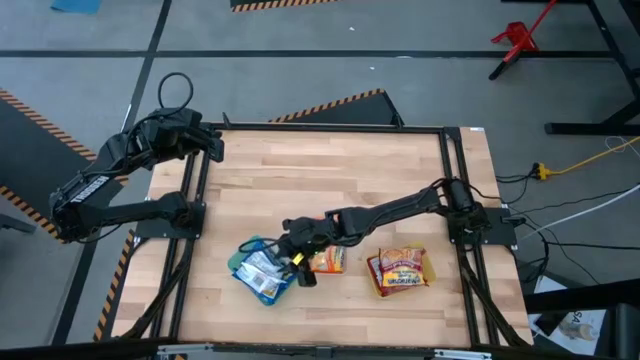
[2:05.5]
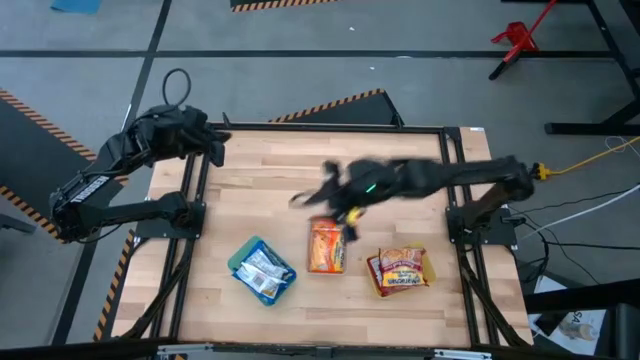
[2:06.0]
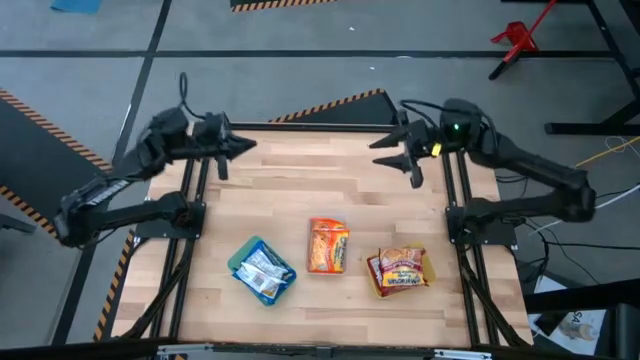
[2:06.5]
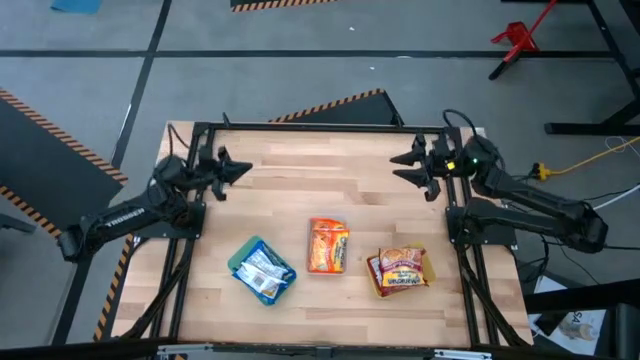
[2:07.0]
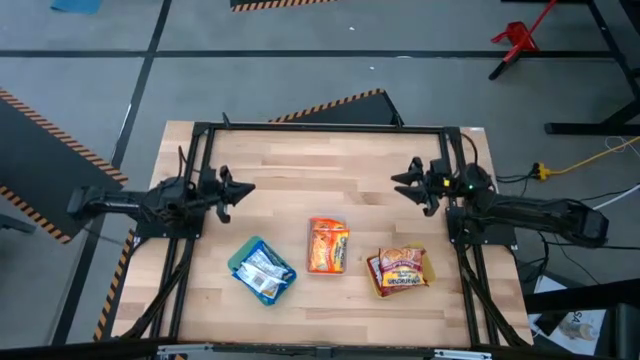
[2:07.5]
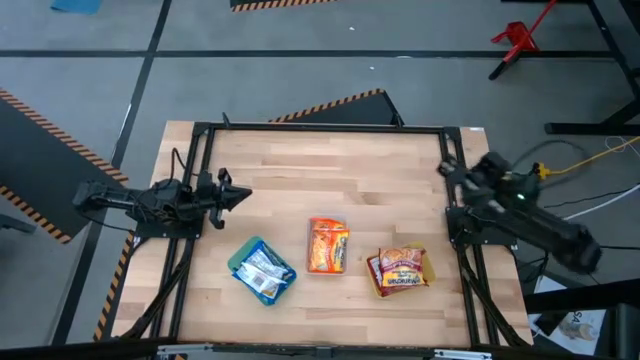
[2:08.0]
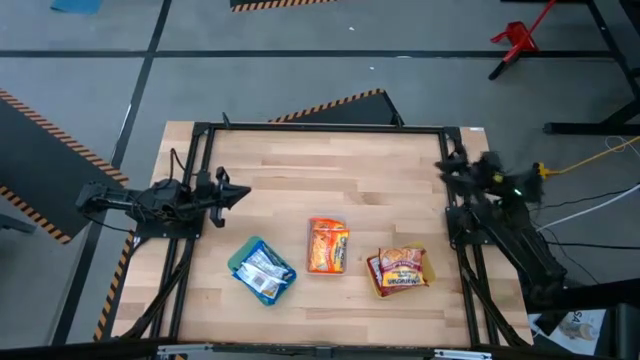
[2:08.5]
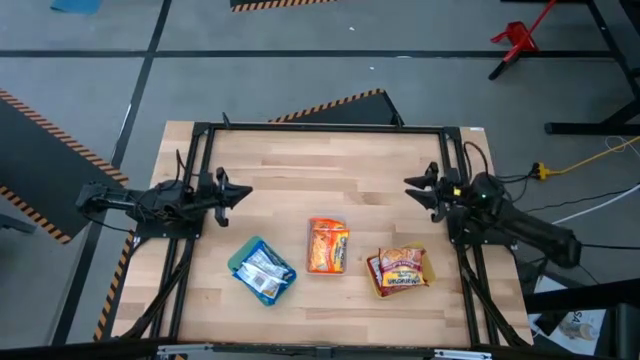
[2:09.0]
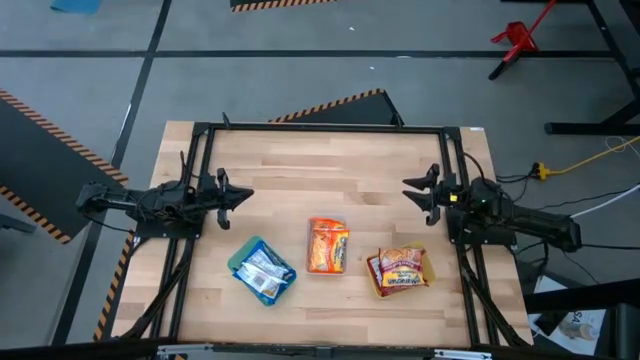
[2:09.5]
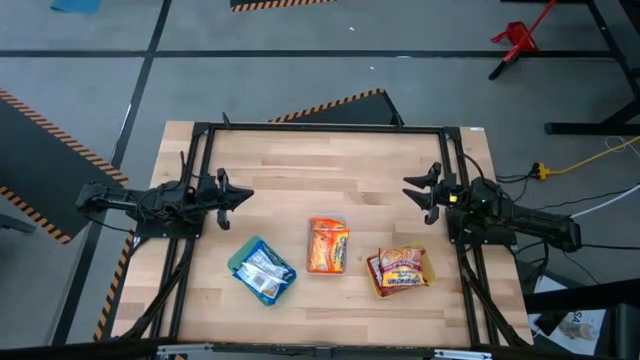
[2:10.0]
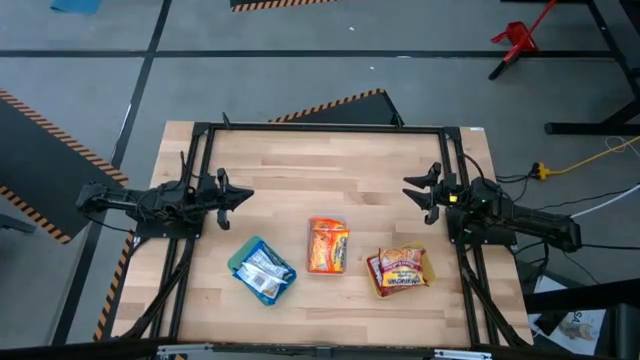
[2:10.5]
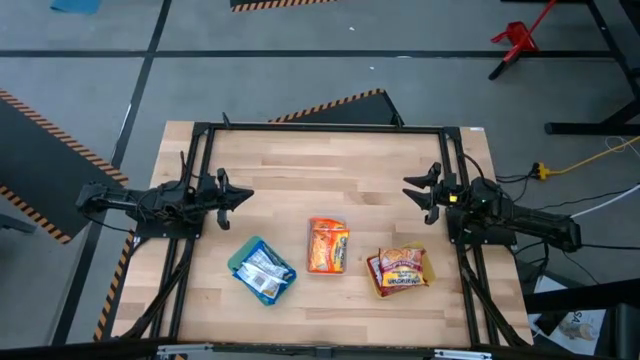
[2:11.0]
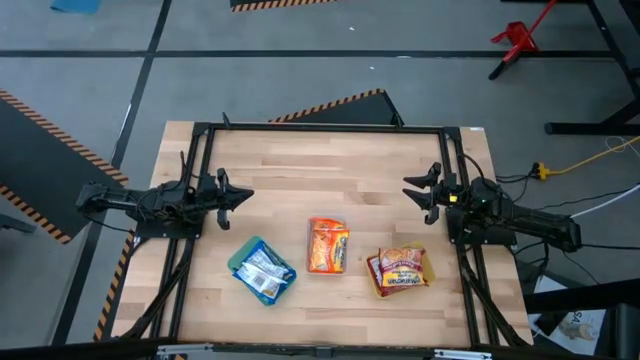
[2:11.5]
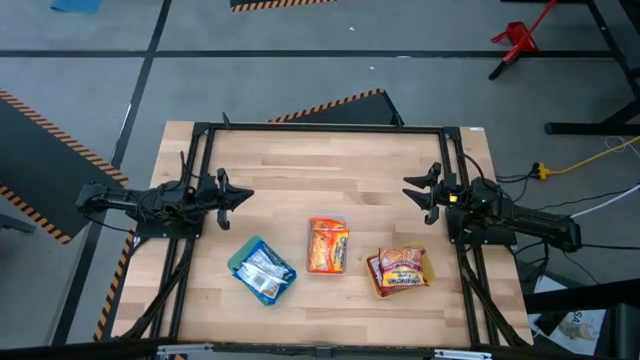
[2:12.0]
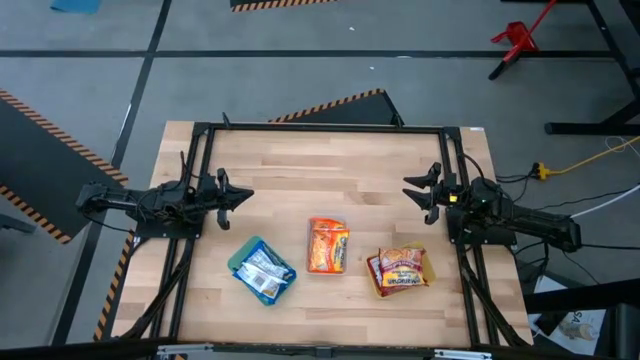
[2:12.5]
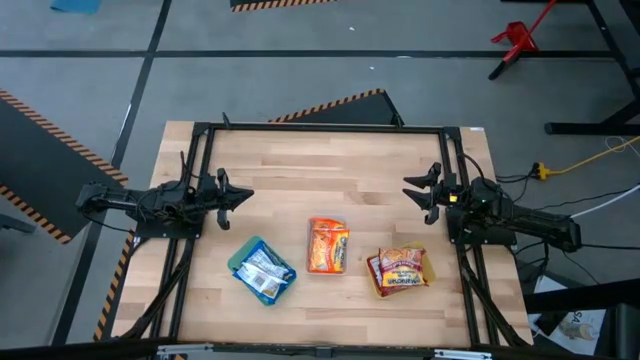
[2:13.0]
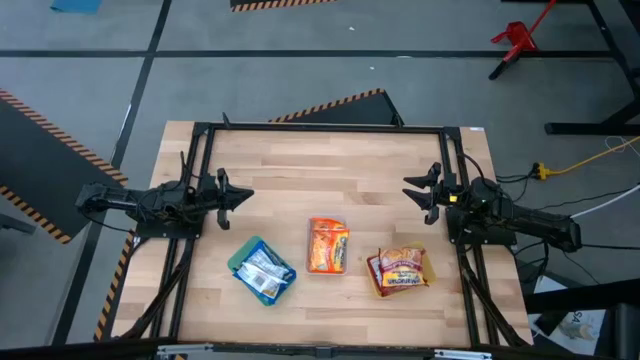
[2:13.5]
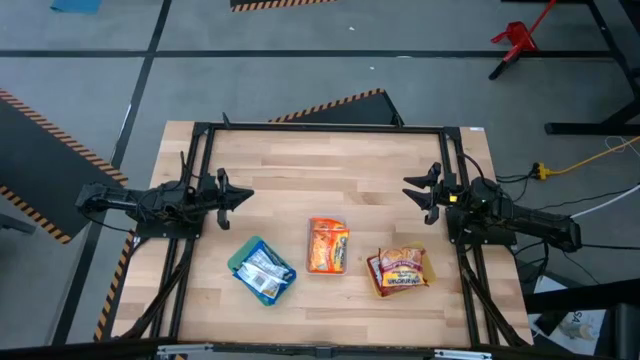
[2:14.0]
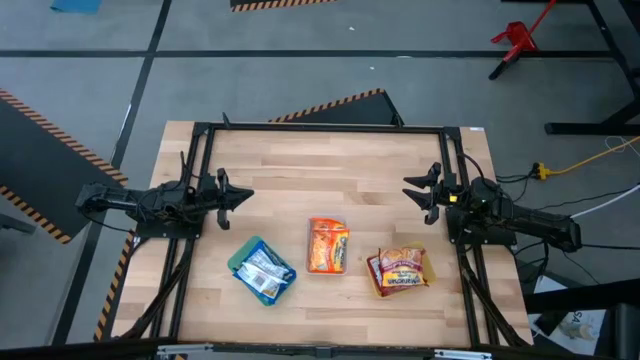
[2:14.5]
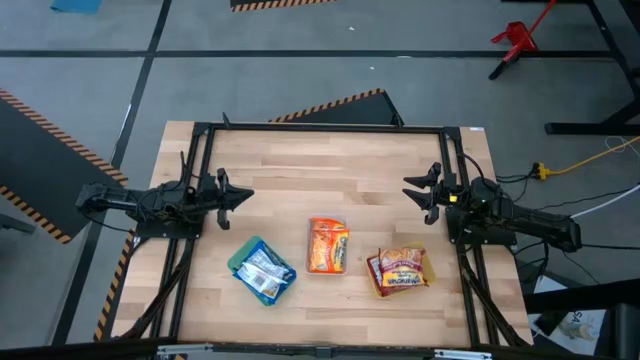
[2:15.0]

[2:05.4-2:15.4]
Task: Sort Maruchan noodles
Return to Home Position

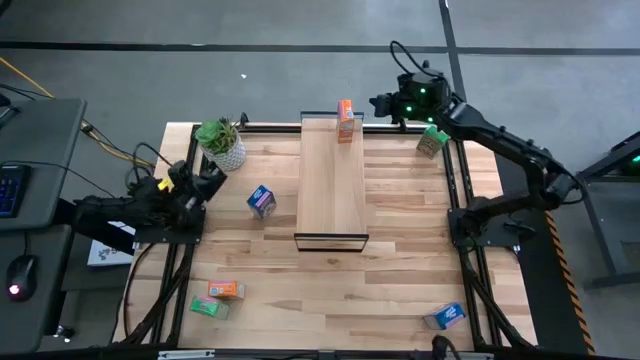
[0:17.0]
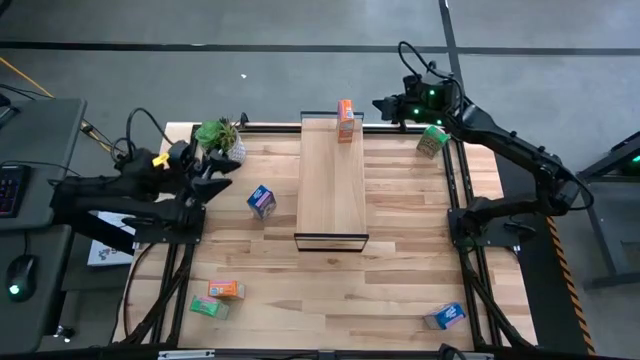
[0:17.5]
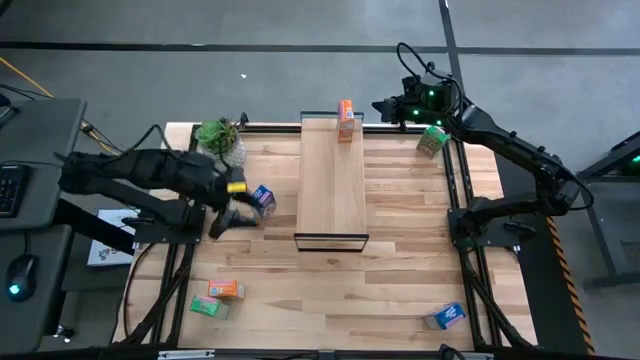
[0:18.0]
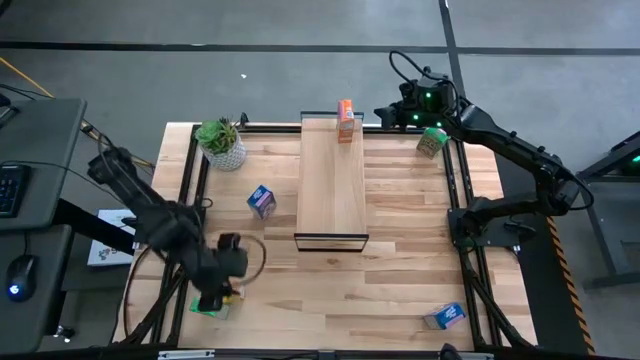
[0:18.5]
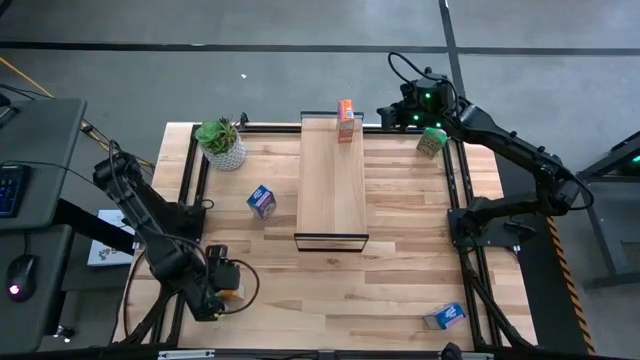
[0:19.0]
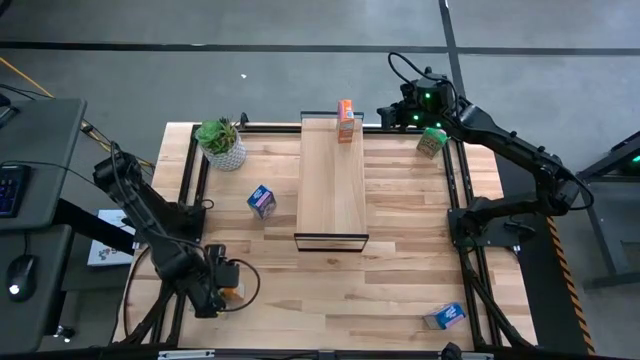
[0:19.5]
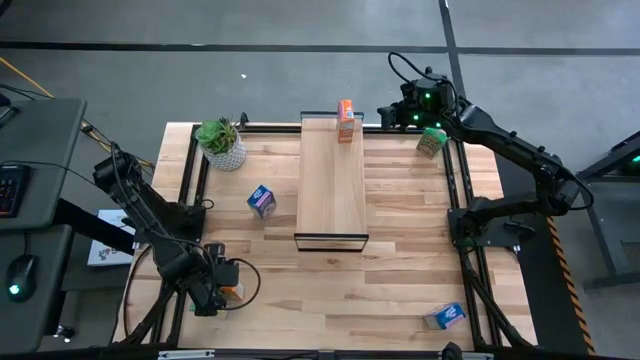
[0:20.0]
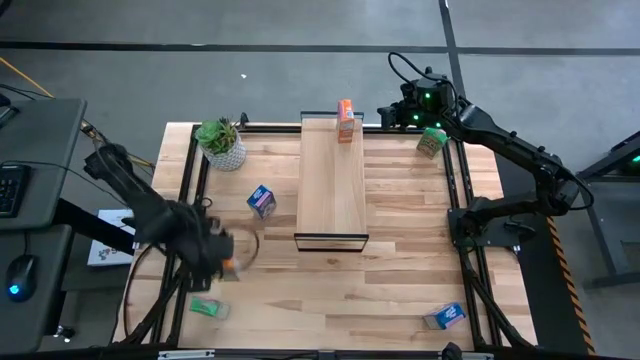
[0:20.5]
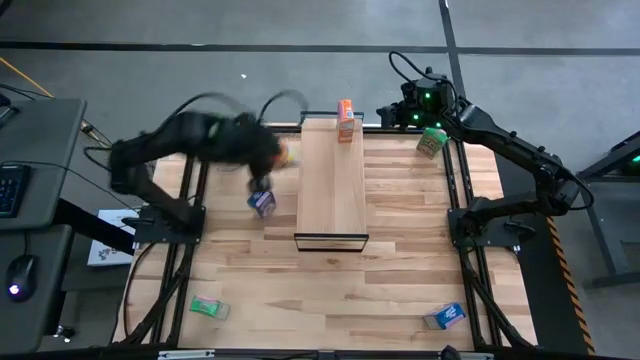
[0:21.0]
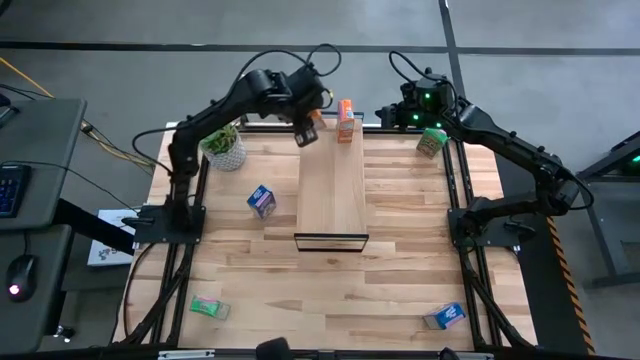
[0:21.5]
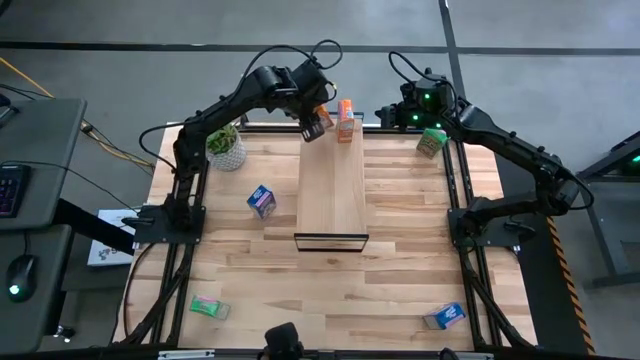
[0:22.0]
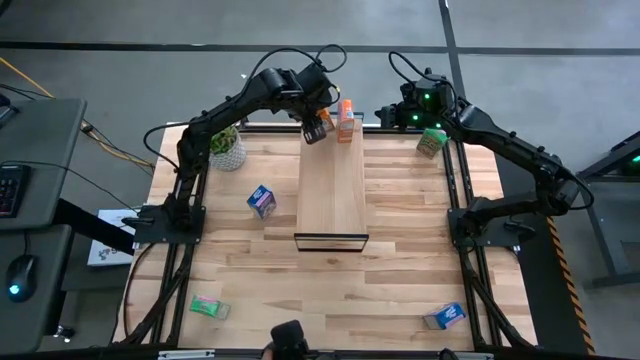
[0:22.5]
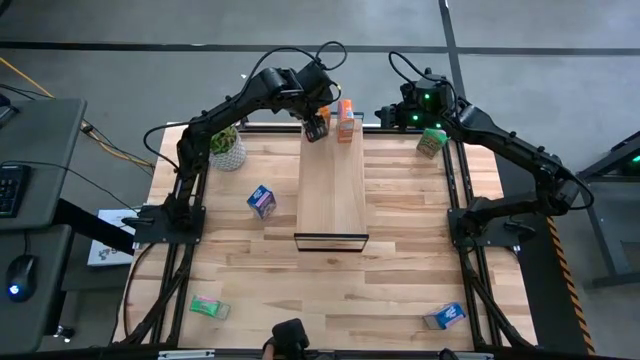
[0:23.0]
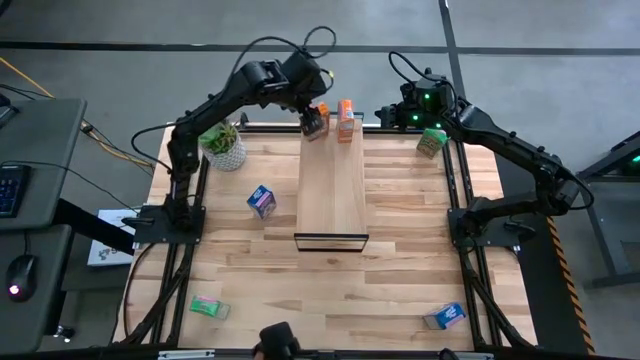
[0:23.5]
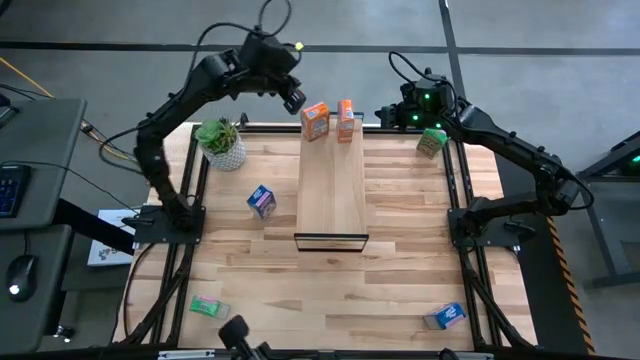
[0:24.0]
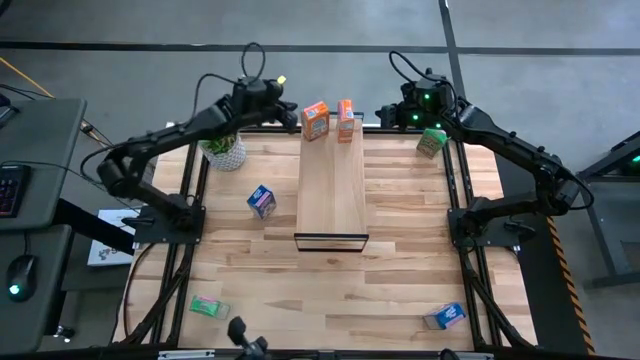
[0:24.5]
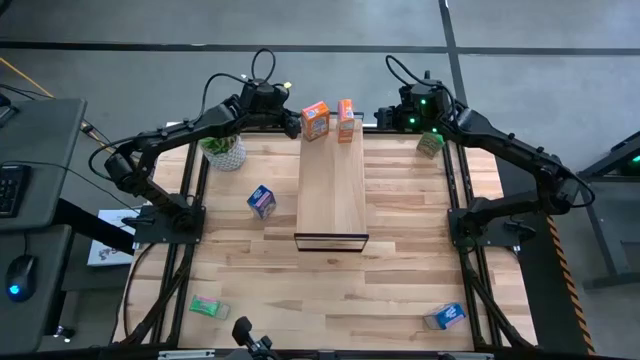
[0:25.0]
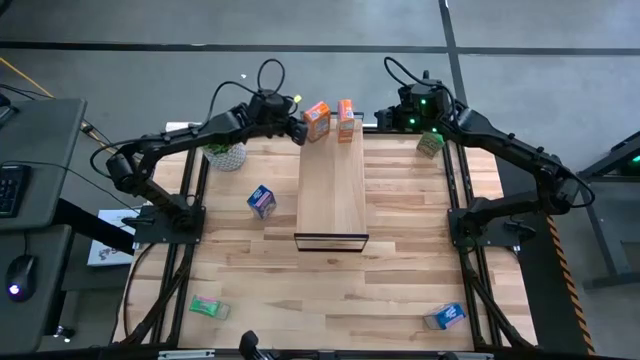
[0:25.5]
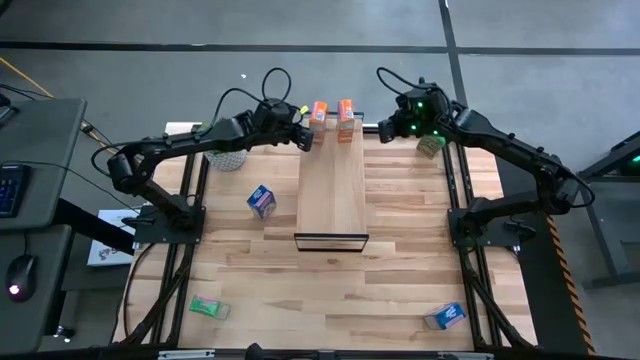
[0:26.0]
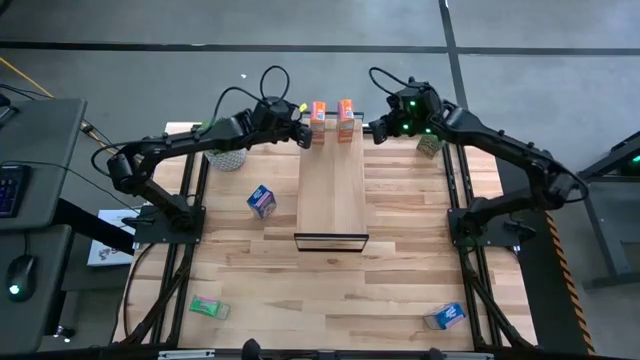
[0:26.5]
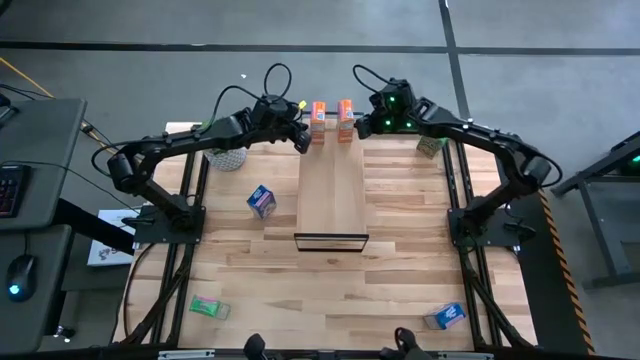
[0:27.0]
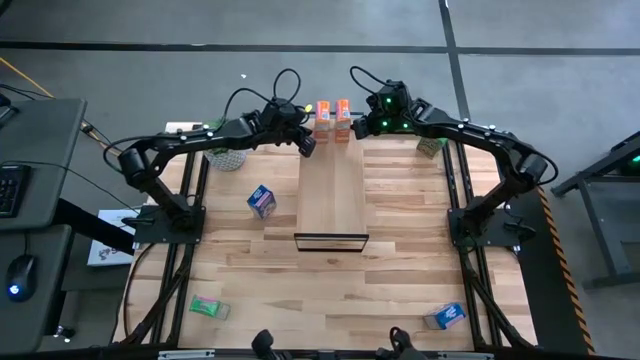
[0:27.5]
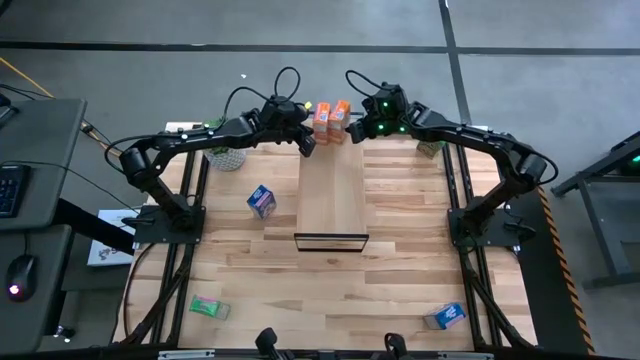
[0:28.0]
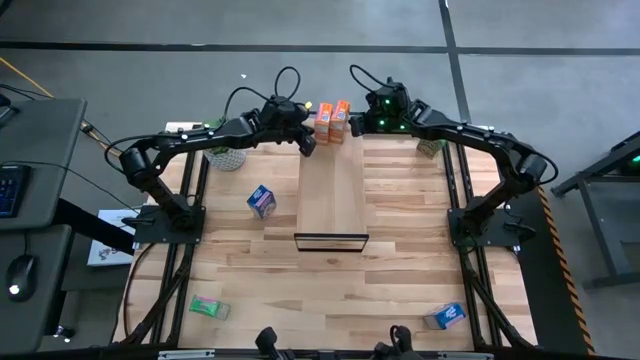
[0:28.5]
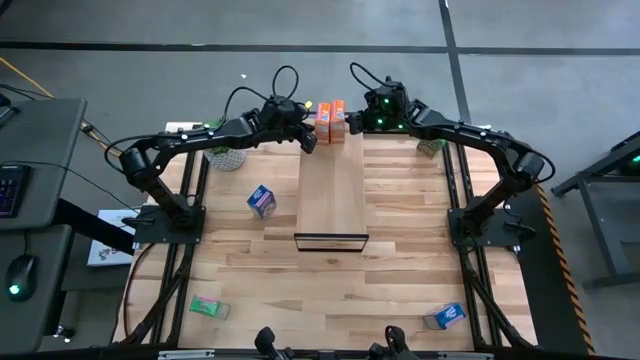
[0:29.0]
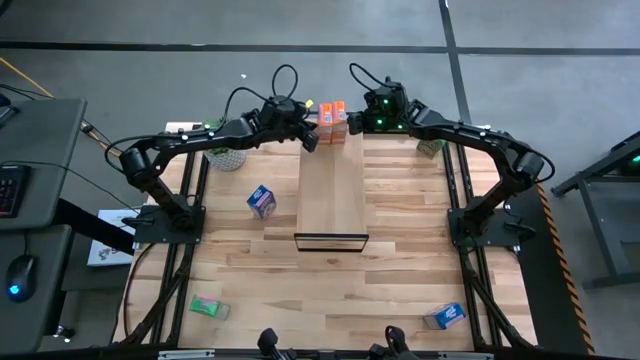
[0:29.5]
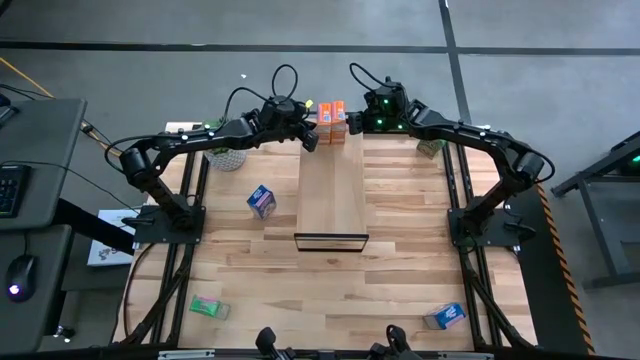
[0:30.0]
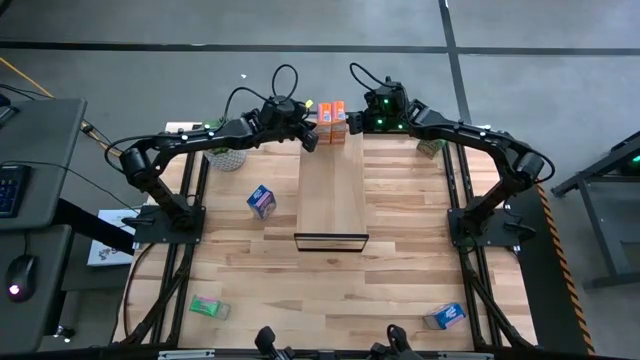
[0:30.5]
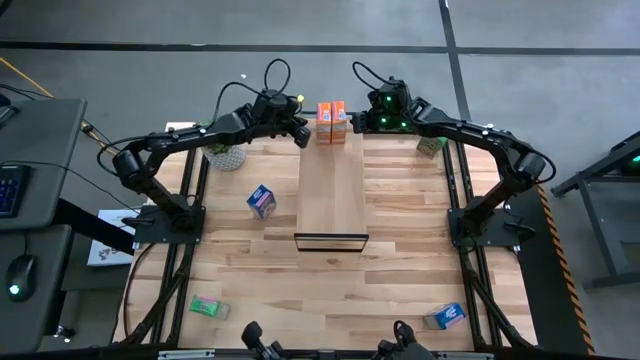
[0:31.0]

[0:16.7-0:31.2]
Task: Stack cereal on shelf
Put the orange cereal box on the shelf aligned with the other orange cereal box
